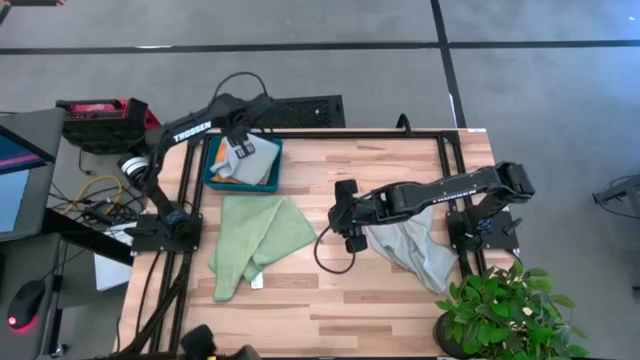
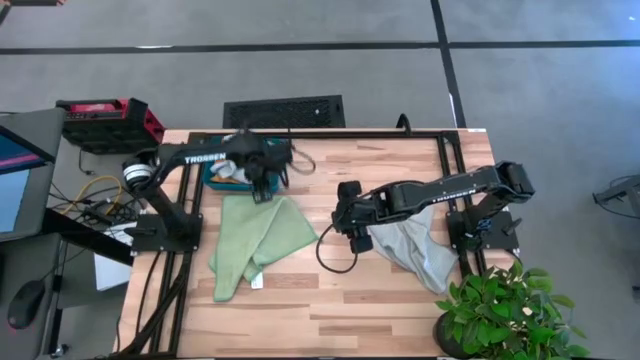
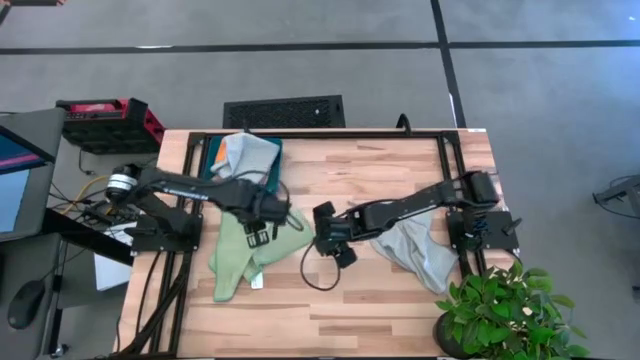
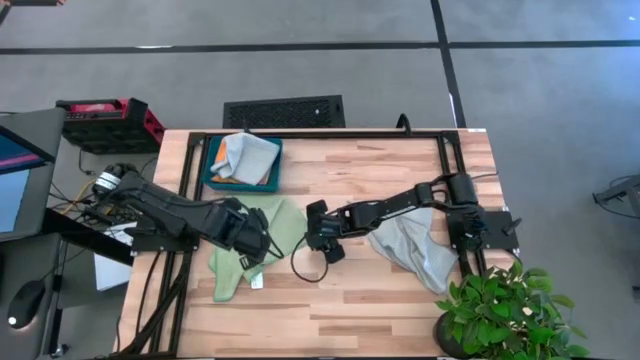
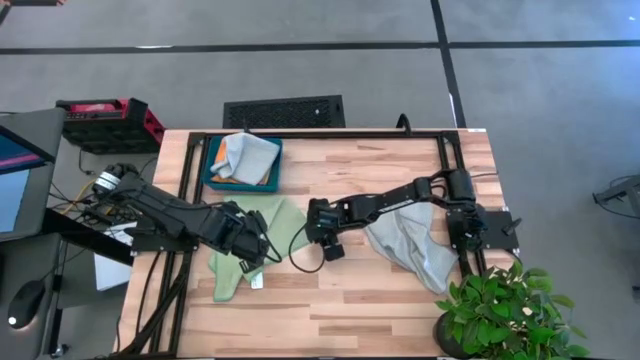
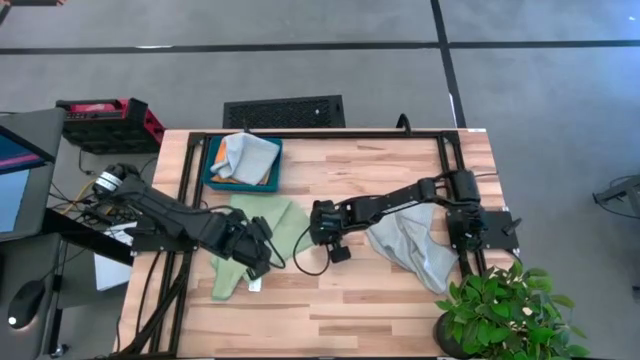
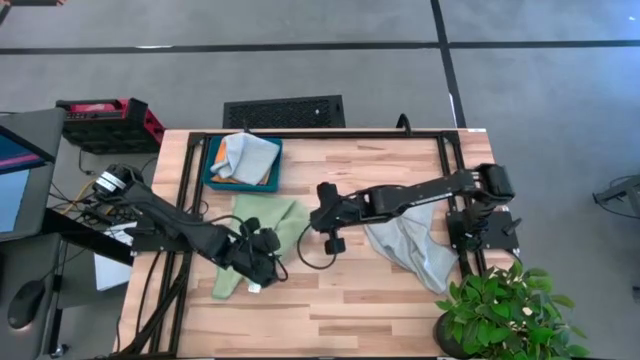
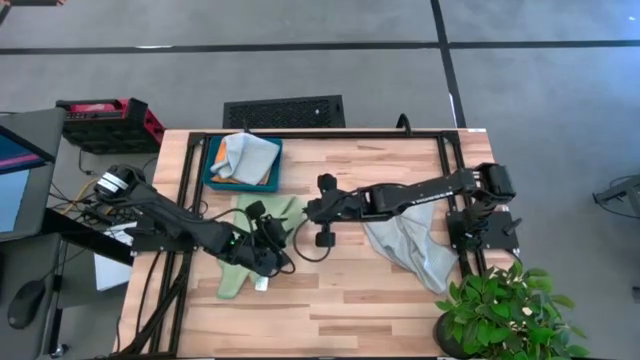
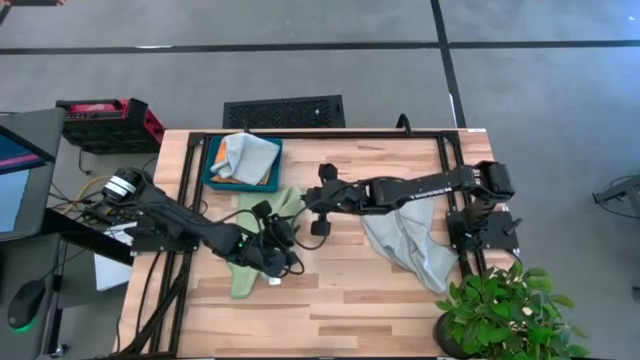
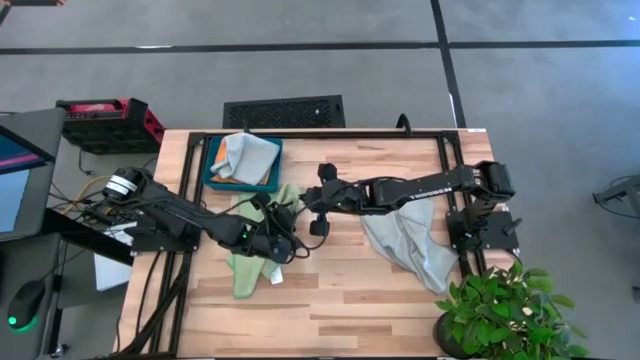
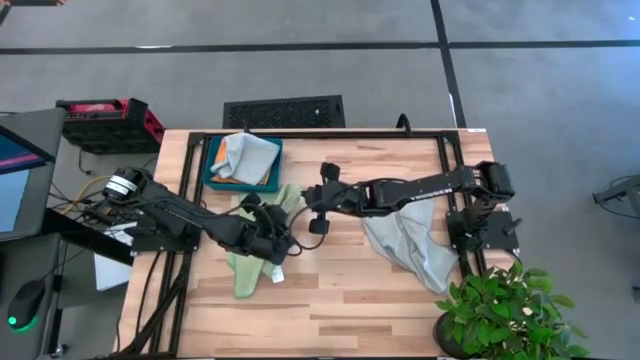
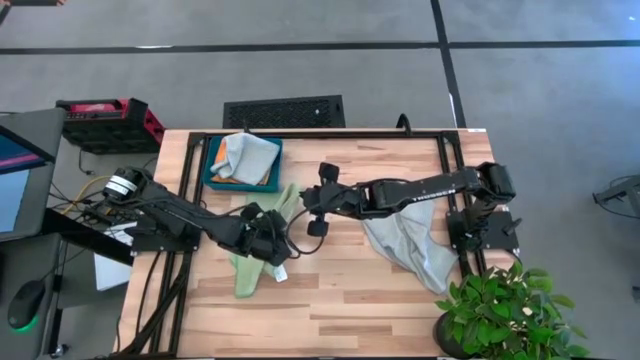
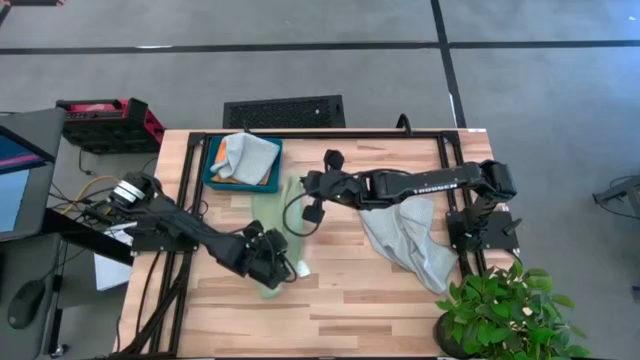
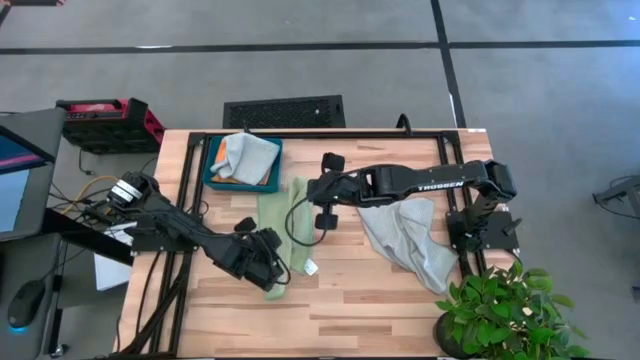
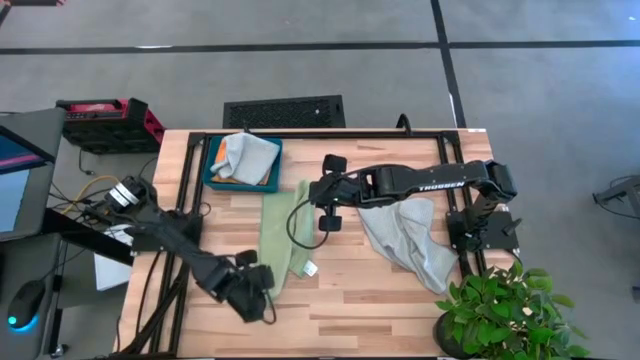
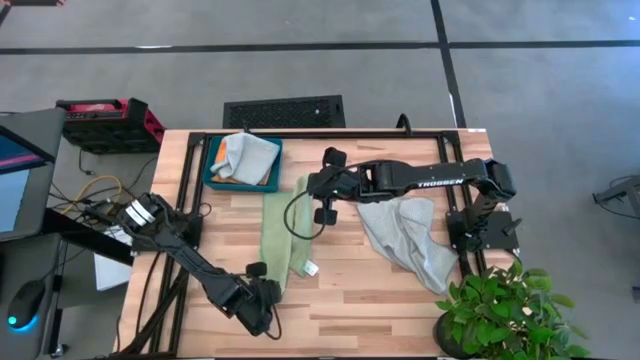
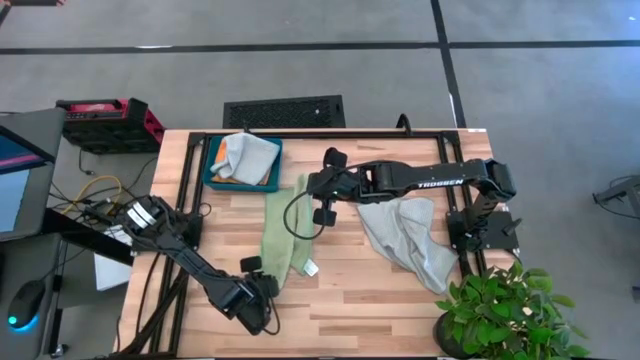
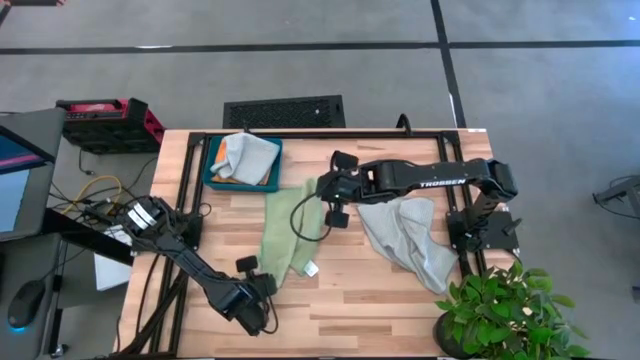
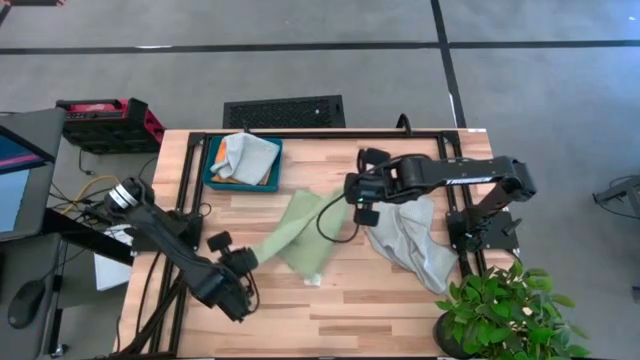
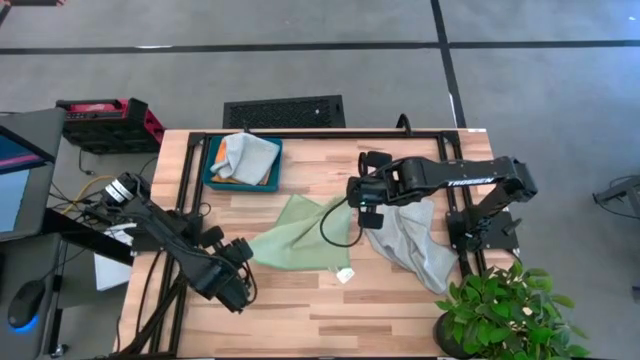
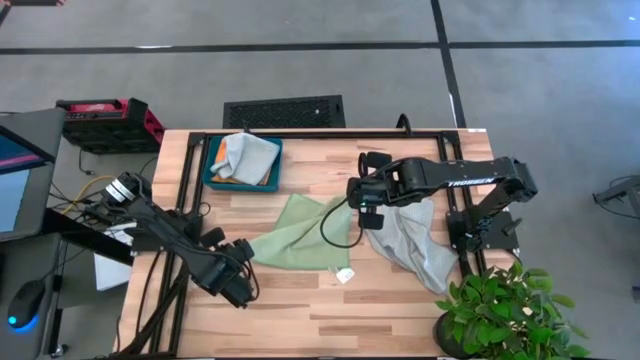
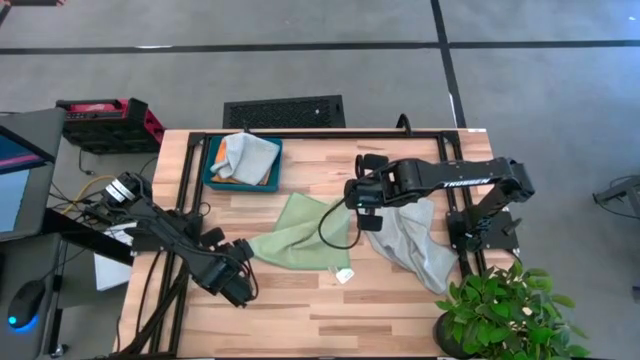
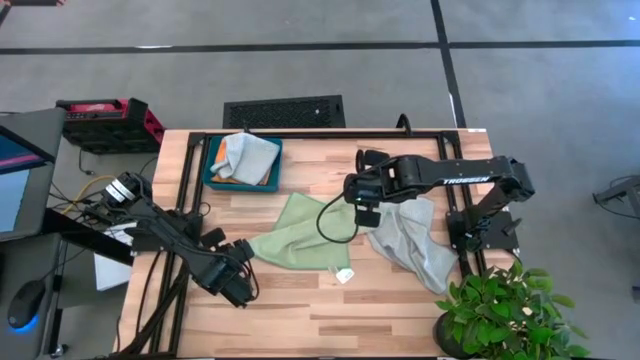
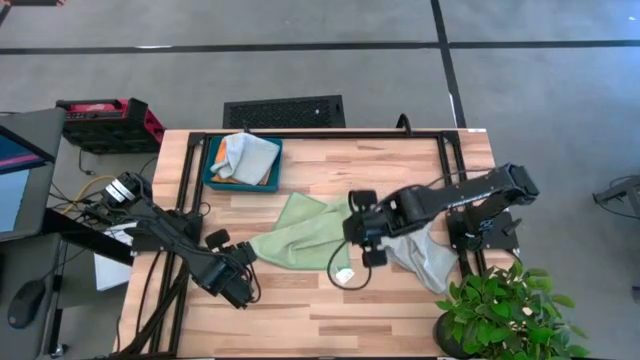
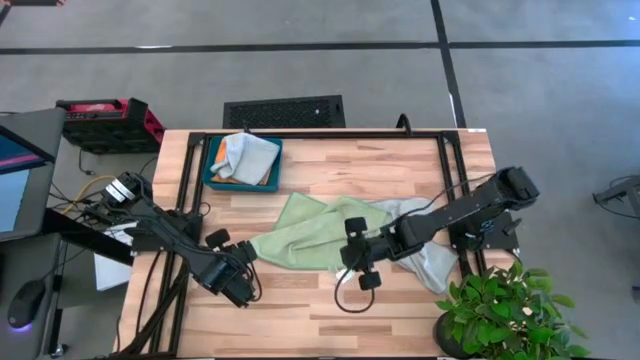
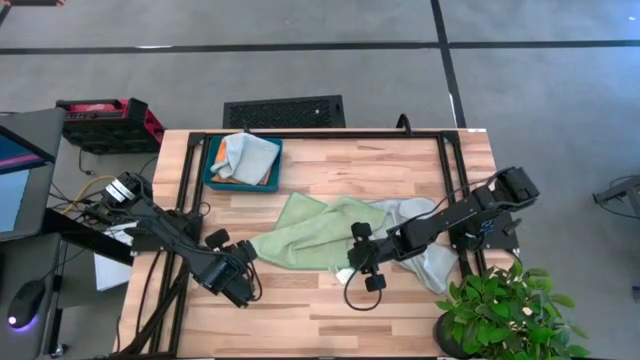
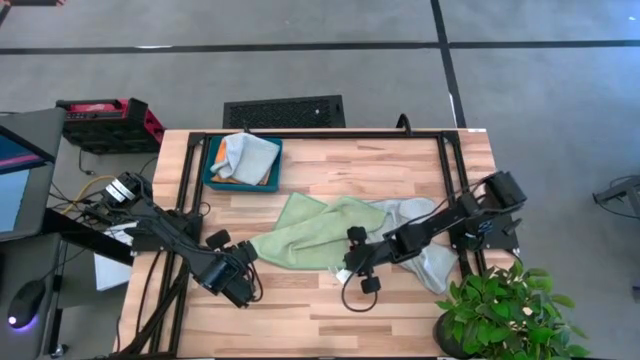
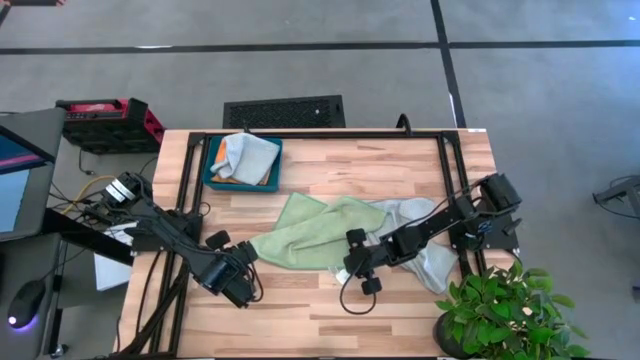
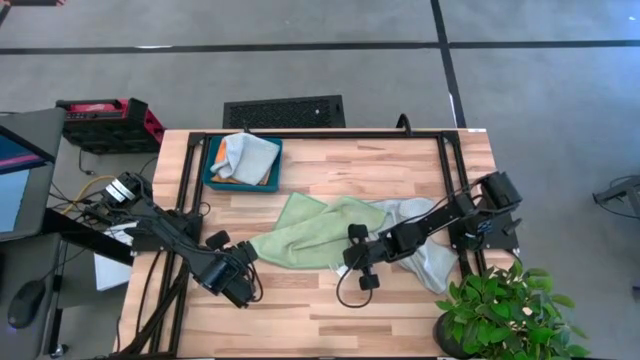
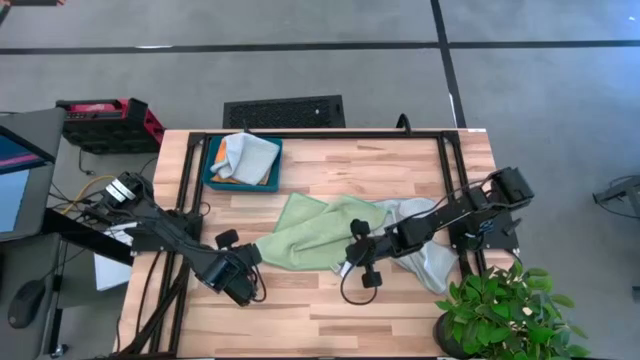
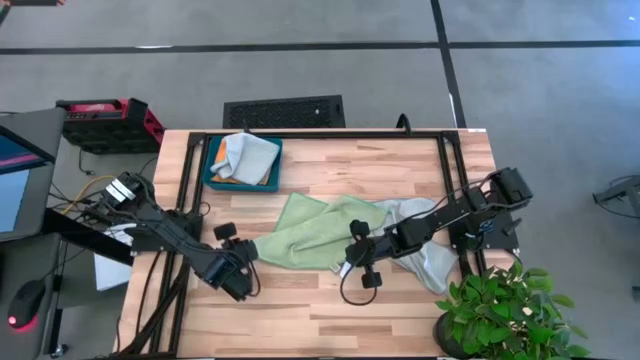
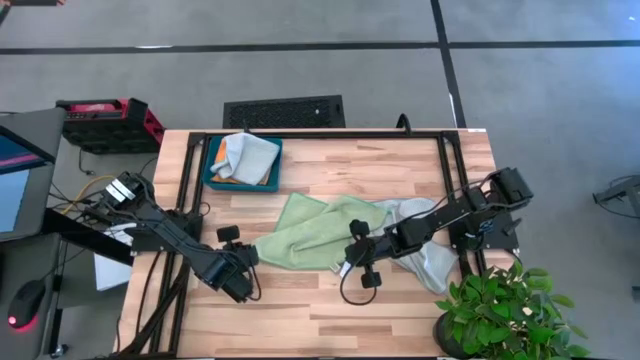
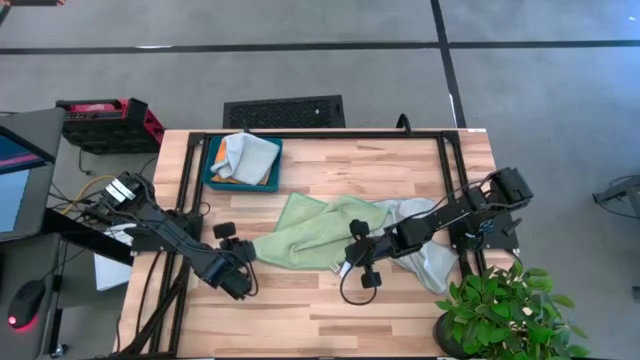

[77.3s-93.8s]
Task: Fold microfiber towels
Fold the green towel

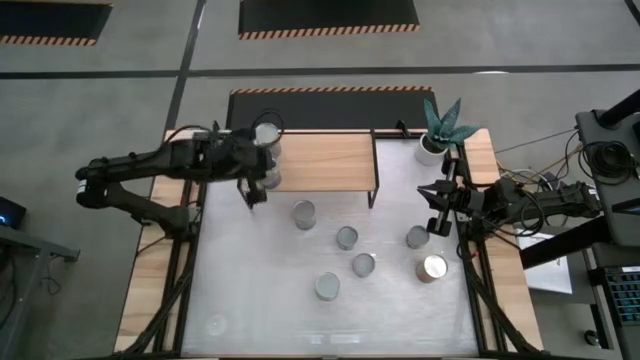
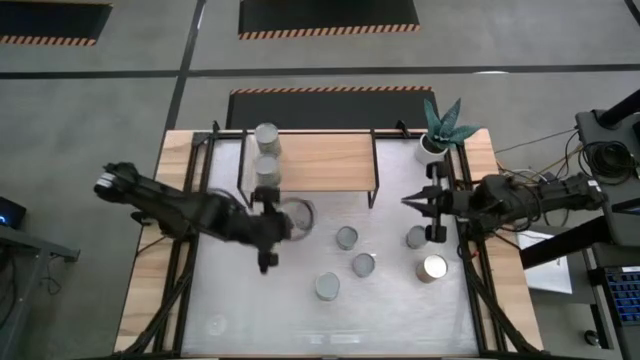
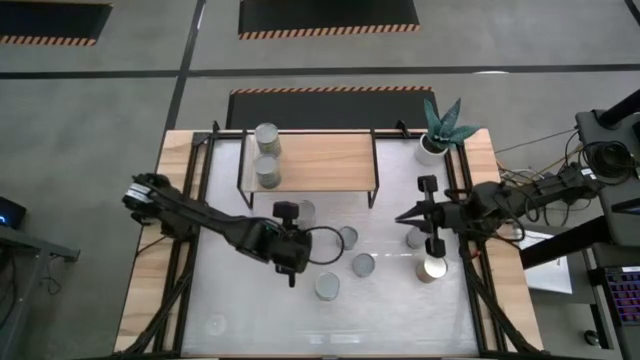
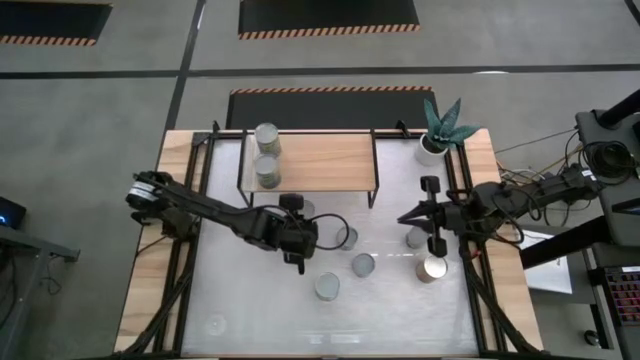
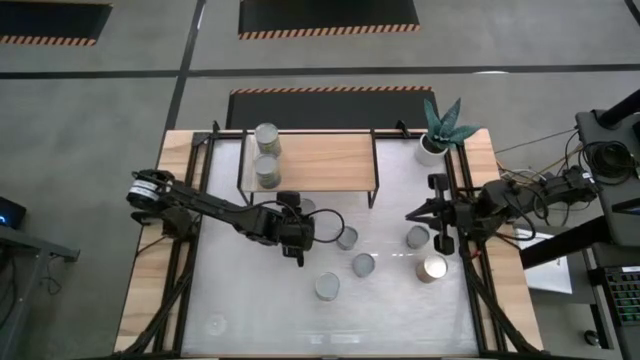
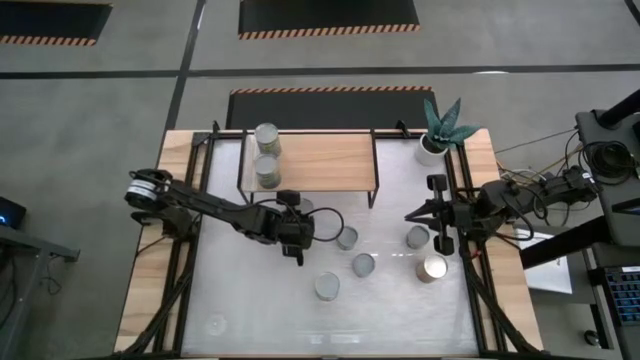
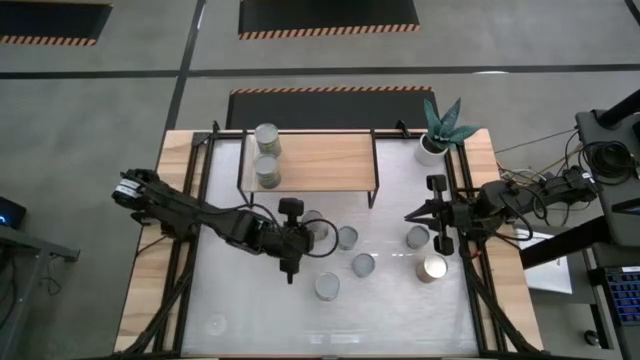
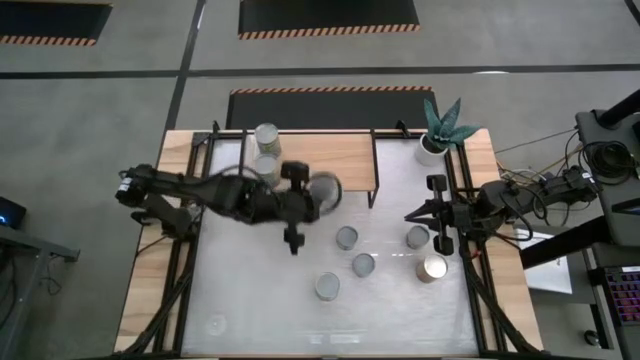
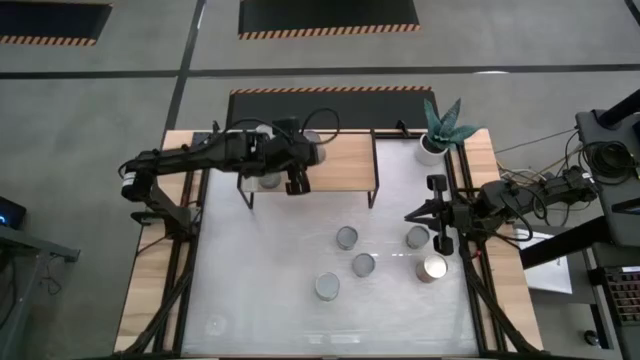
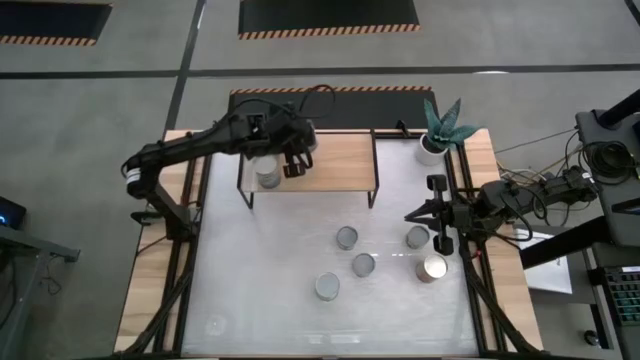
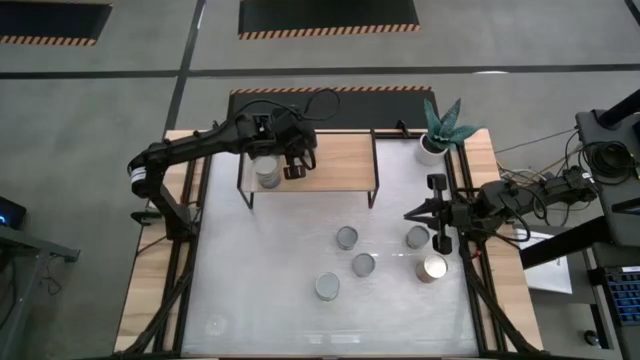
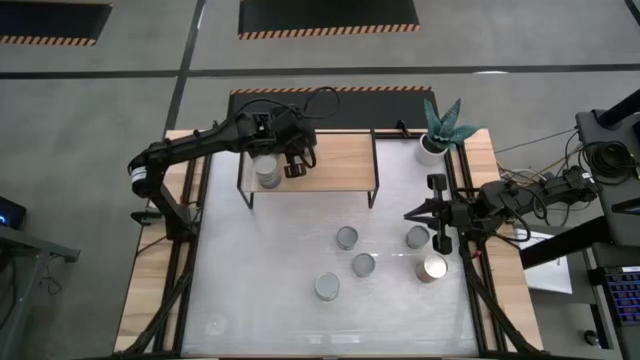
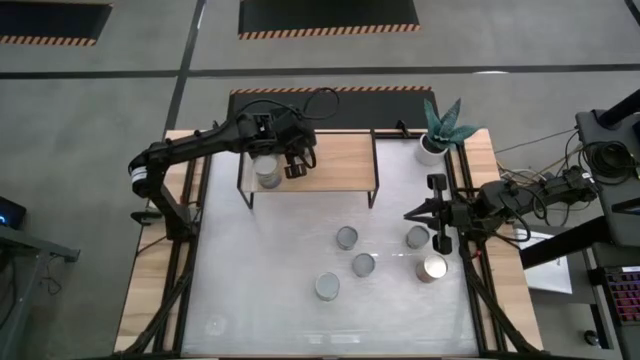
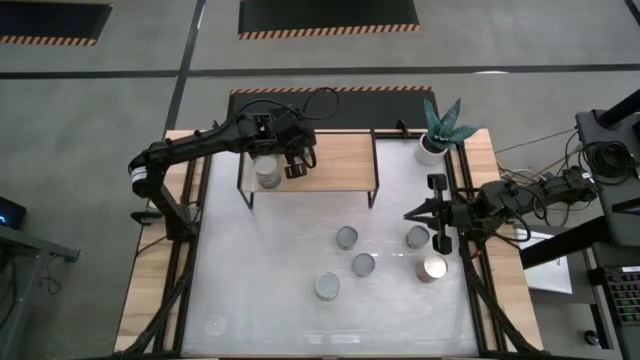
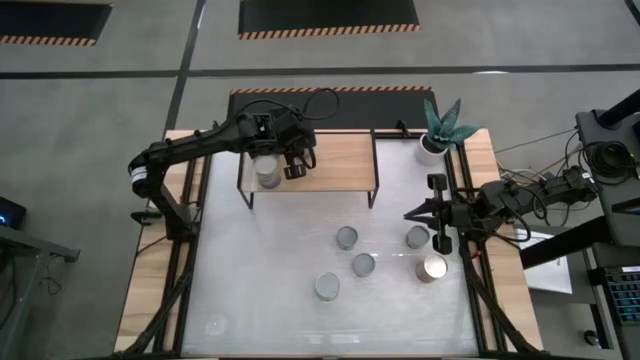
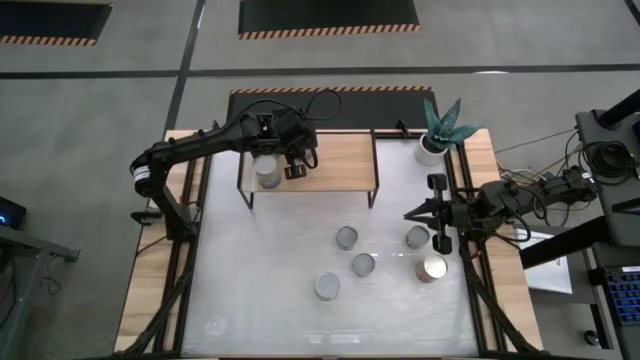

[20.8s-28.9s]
Task: Pick and place cans onto a shelf
Put the large canned peas on the shelf
